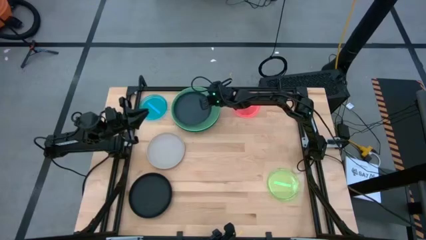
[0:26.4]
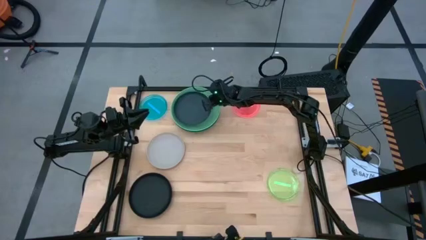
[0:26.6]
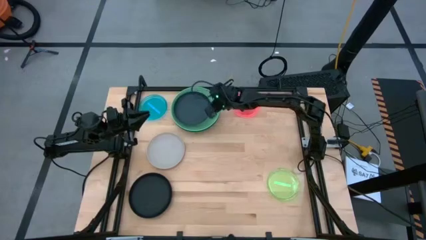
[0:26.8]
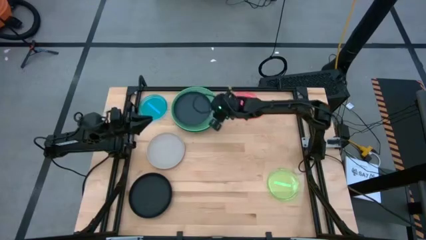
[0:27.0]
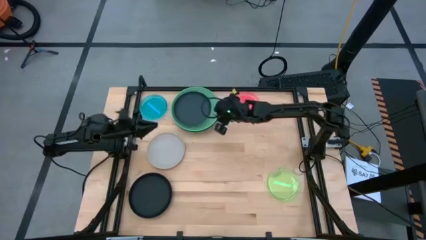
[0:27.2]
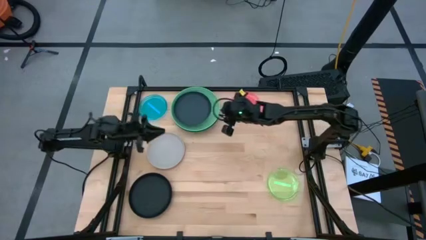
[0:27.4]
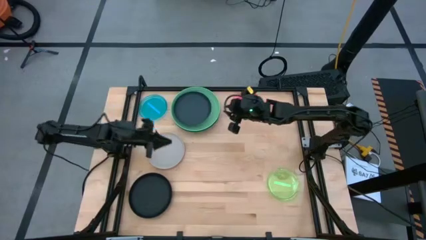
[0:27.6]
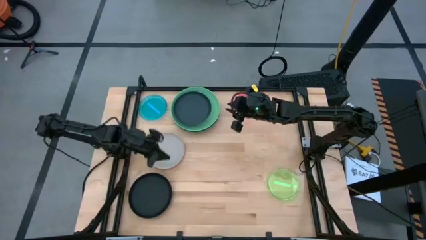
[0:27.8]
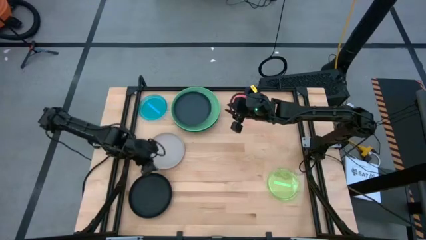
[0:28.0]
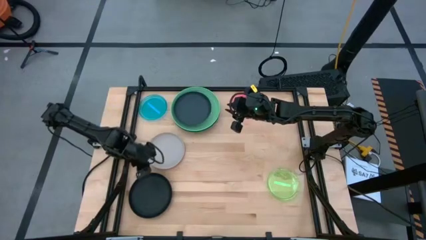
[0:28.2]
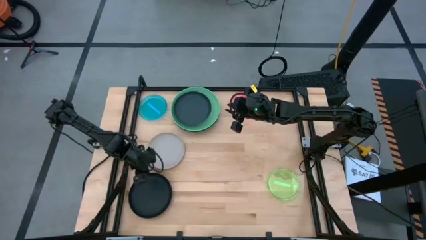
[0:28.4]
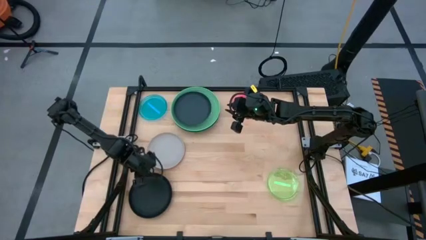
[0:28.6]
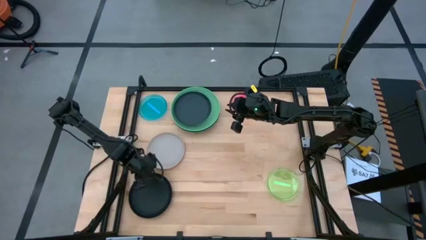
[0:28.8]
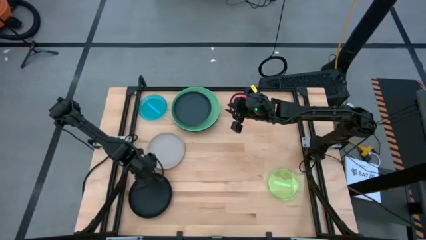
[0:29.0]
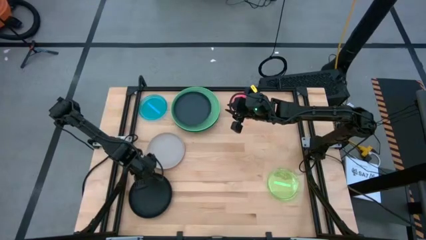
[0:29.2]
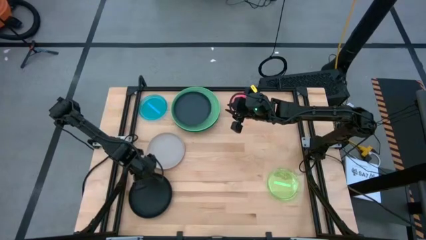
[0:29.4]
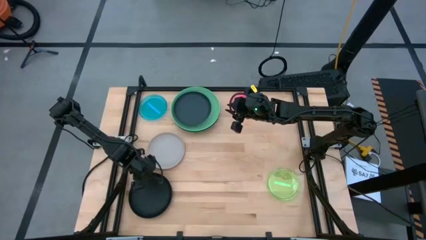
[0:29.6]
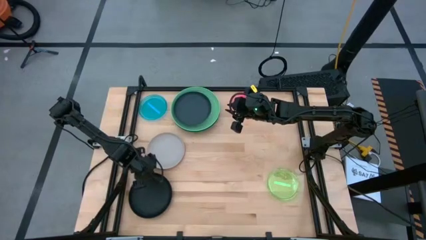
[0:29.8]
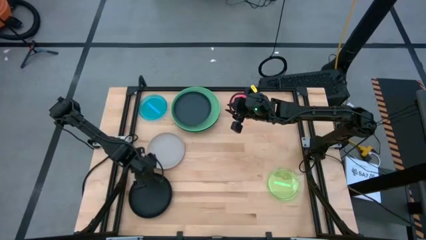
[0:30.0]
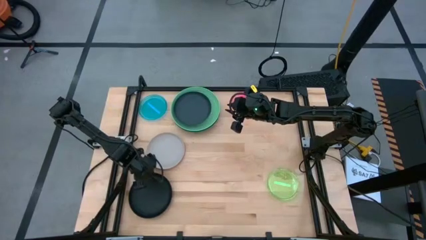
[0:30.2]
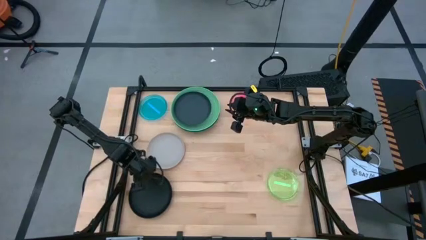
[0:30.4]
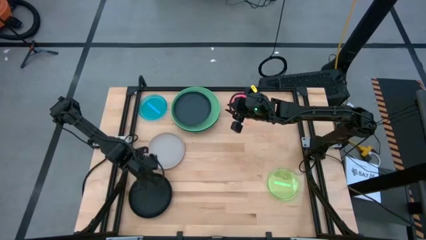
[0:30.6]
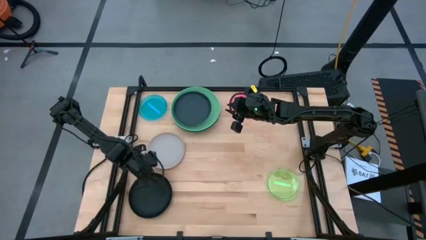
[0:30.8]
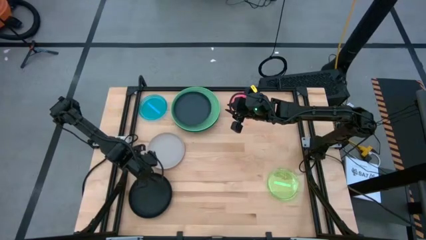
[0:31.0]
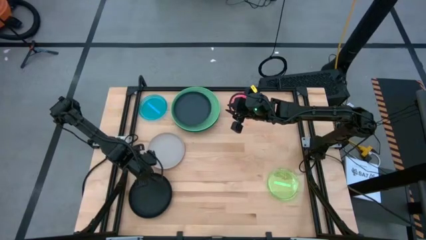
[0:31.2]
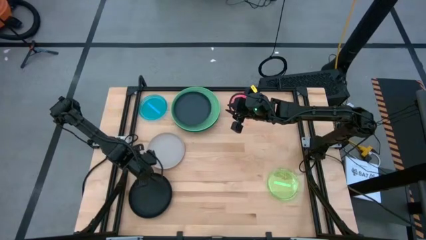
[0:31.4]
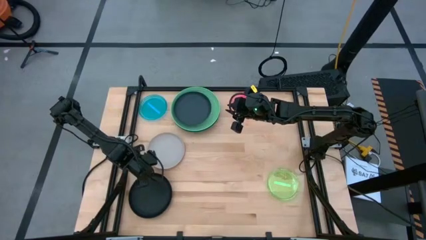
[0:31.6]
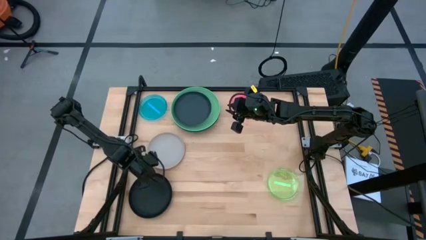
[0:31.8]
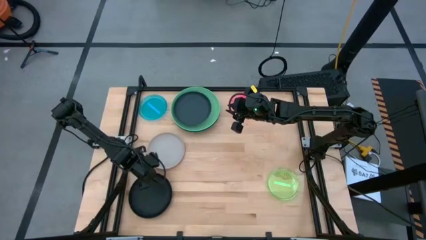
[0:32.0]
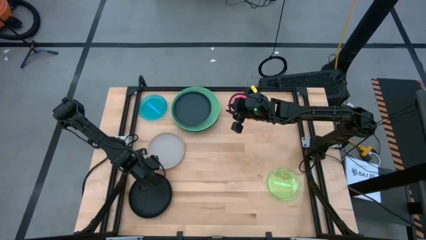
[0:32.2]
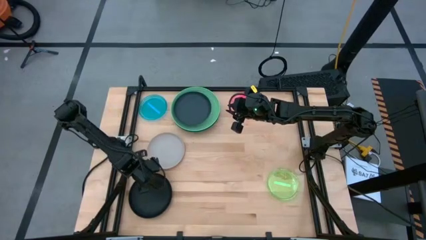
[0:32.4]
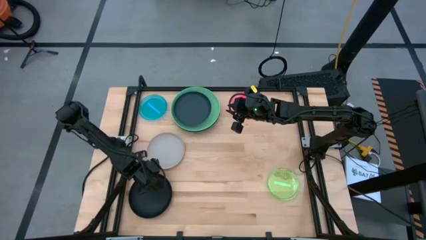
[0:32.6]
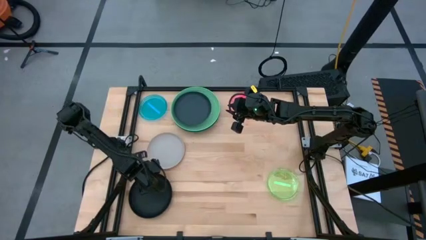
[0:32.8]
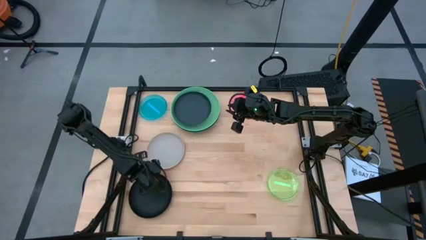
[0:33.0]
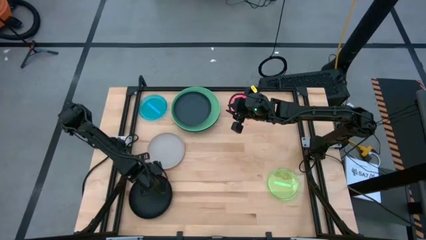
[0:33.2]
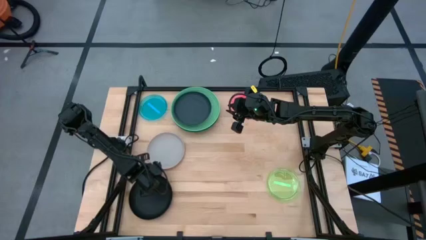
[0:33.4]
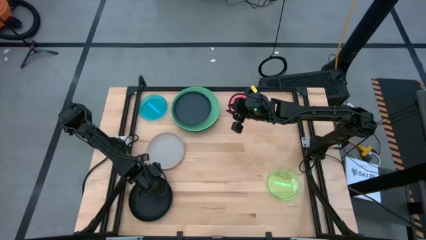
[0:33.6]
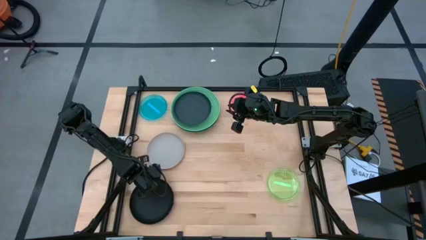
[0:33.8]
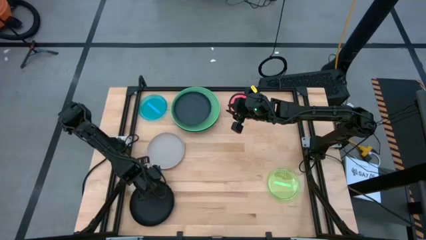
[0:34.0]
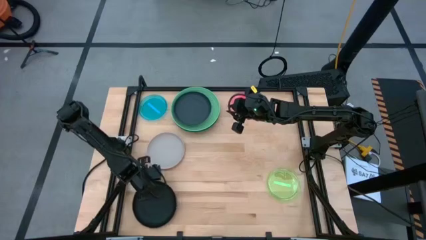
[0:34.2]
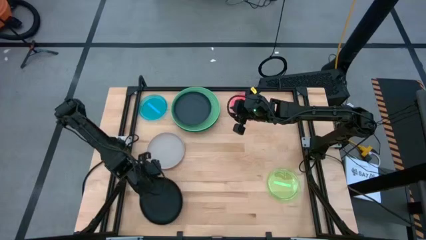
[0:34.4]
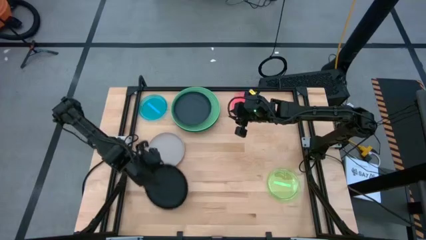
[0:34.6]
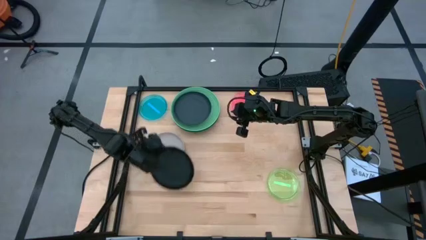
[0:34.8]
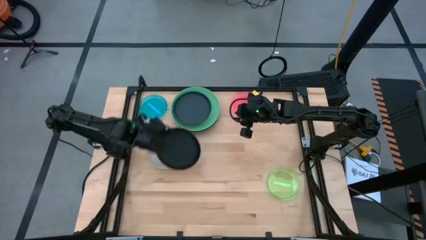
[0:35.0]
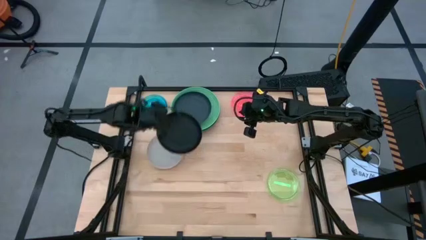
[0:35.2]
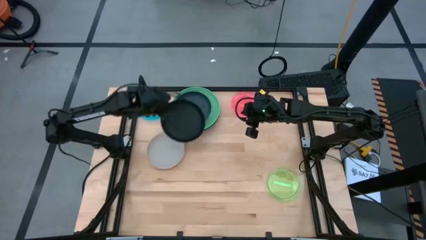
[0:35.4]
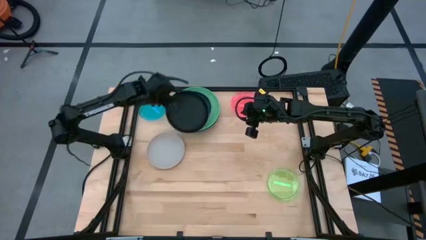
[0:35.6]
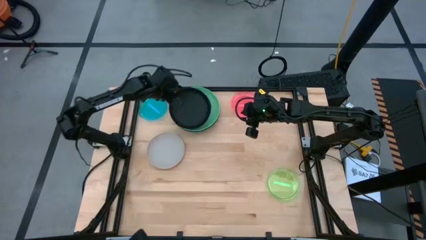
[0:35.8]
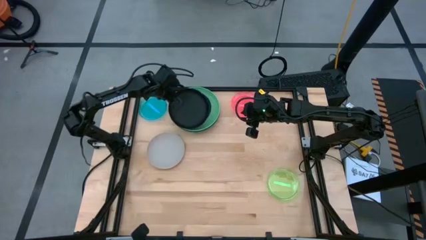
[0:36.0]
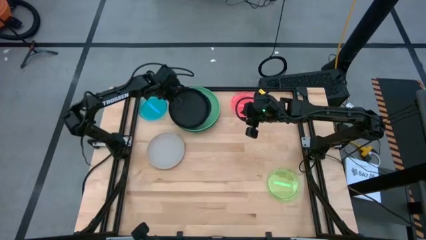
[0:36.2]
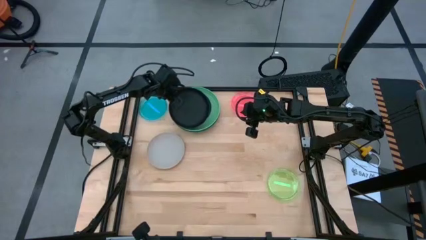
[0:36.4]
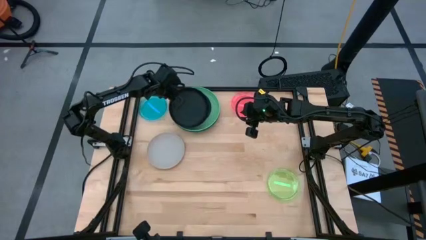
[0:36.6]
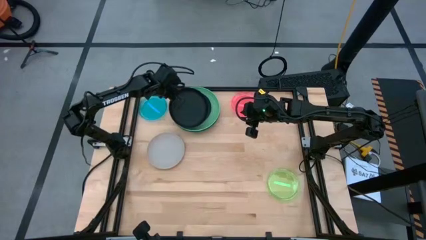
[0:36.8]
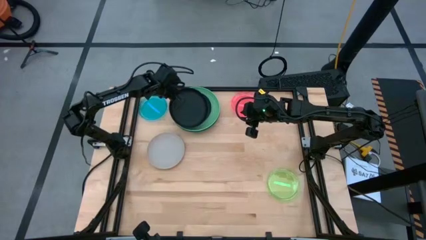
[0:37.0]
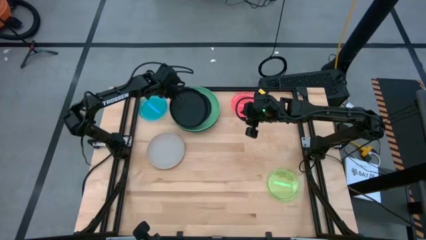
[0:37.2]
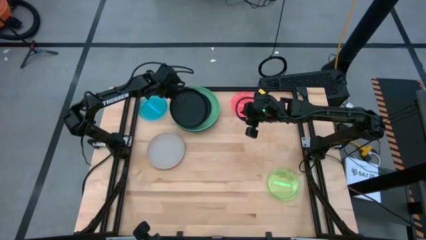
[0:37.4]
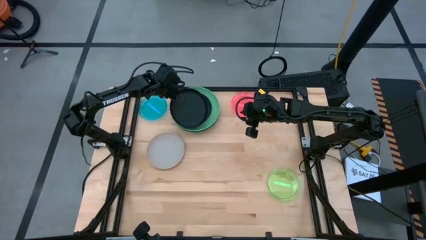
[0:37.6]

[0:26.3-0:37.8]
Task: Stack plastic plates
Stack the black plate on the dark blue plate
